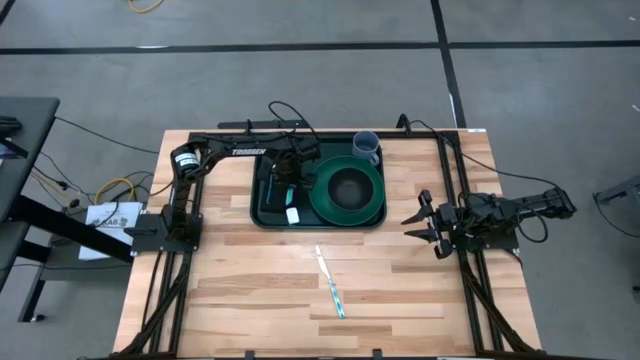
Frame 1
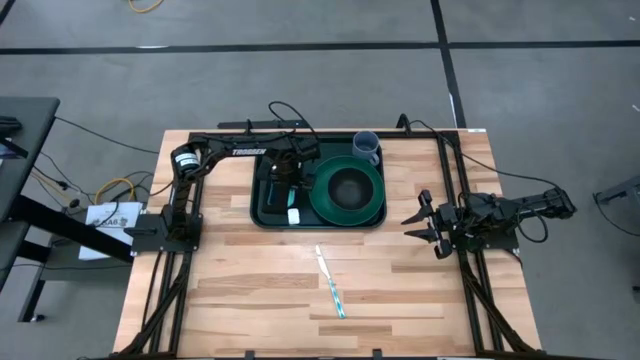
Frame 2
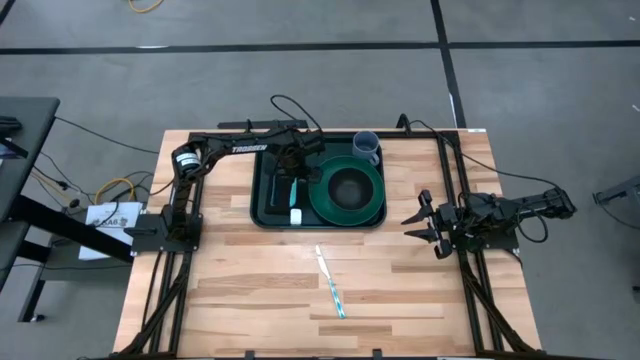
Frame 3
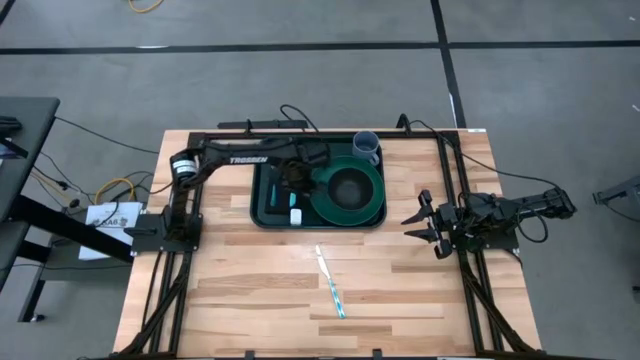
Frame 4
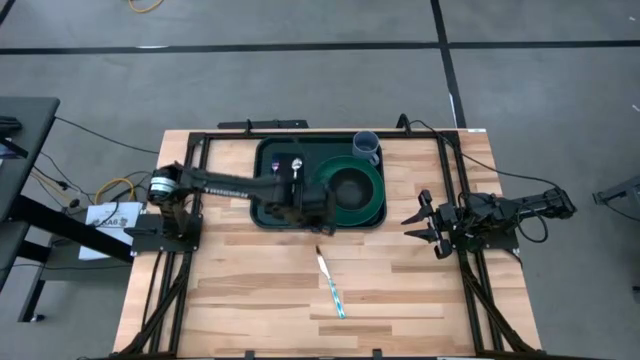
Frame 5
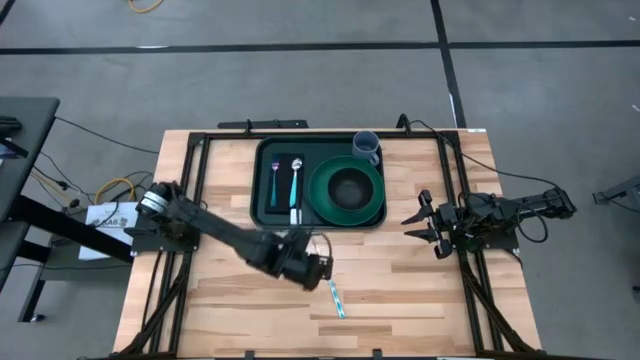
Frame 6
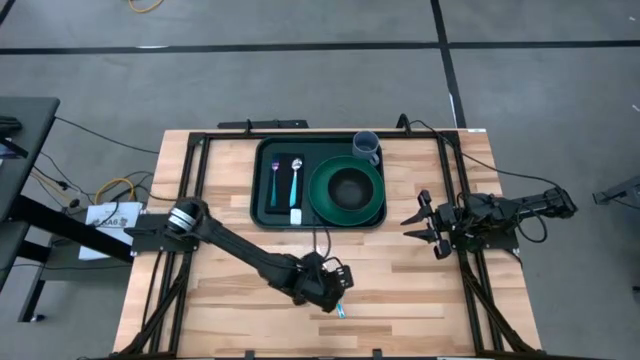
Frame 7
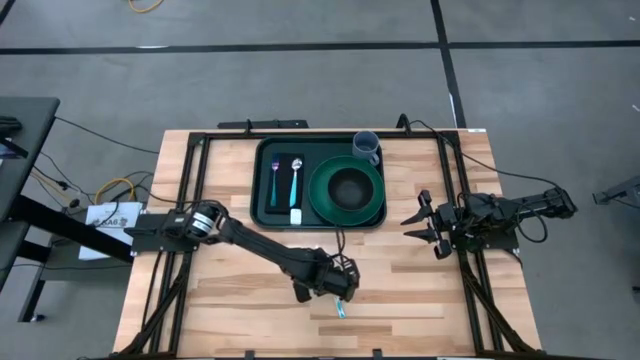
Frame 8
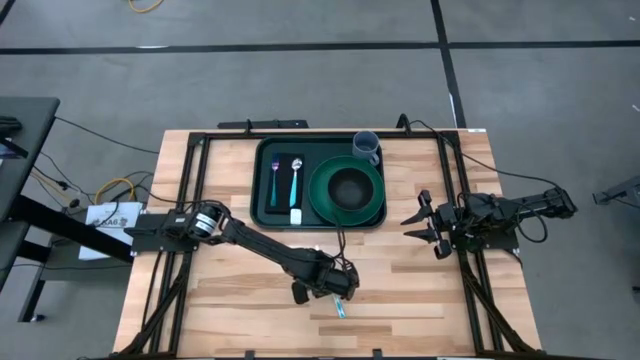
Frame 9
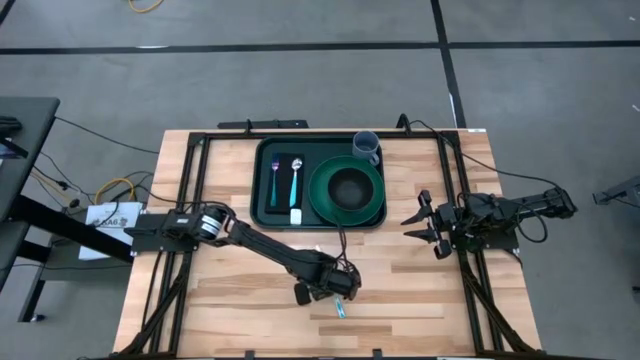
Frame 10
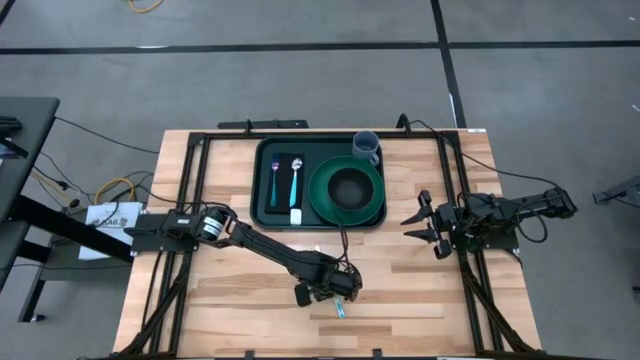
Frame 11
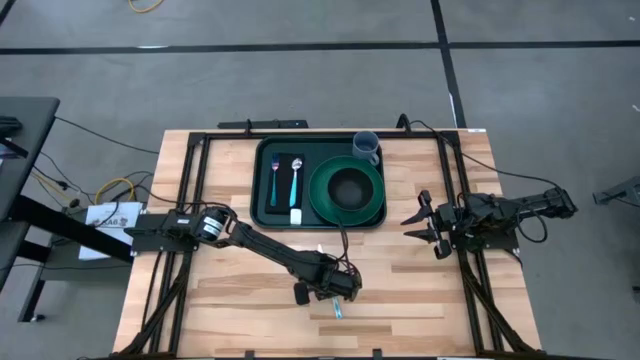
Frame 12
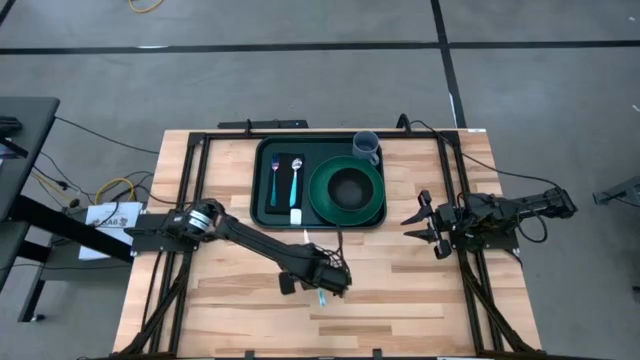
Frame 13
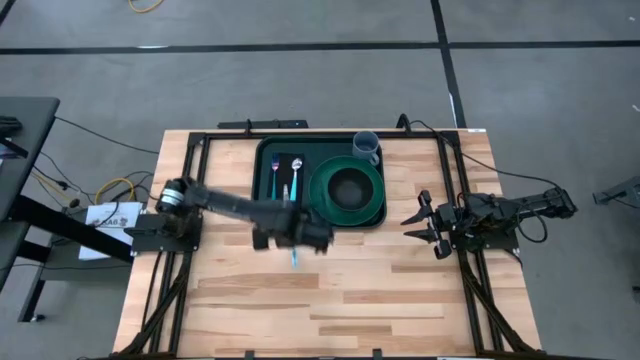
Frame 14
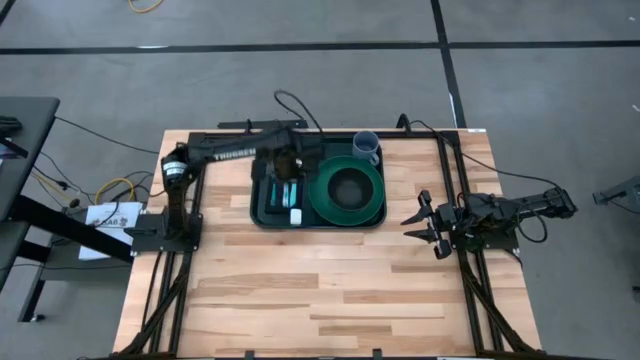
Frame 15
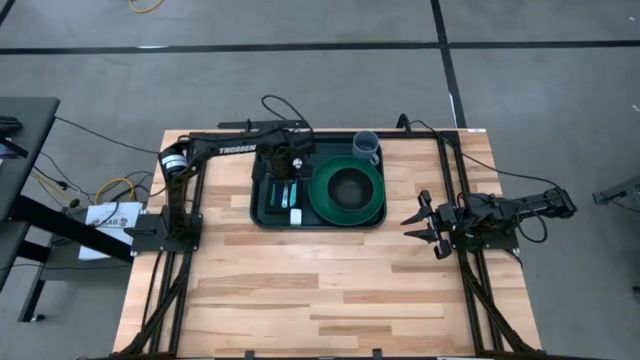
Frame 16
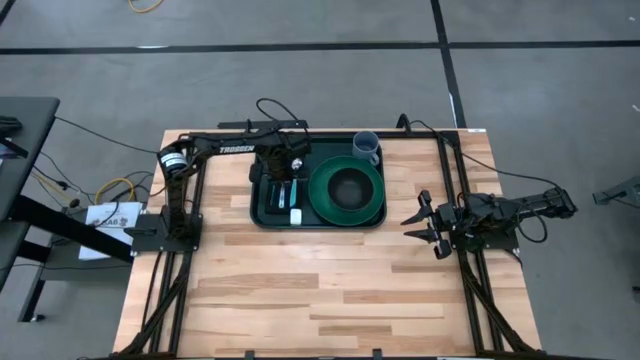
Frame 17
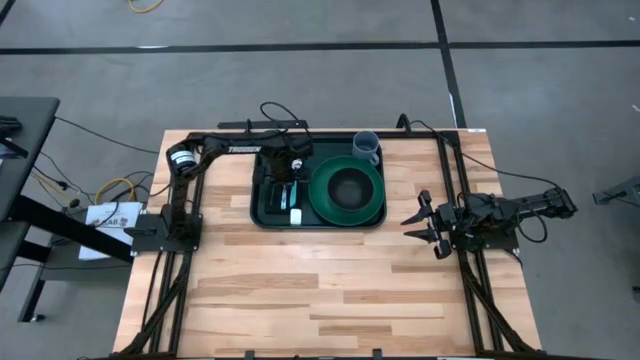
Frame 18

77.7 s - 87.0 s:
Task: Set up tray
Put the white patterned knife on the black napkin between the purple fork and blue spoon

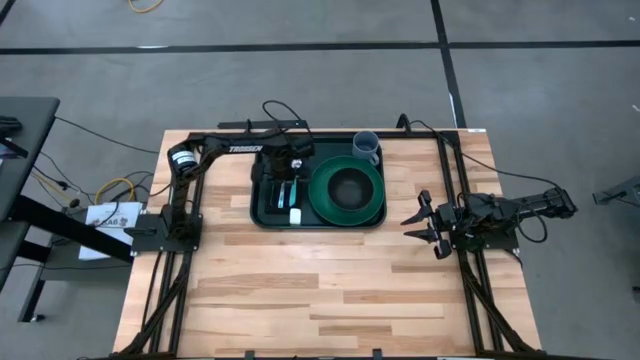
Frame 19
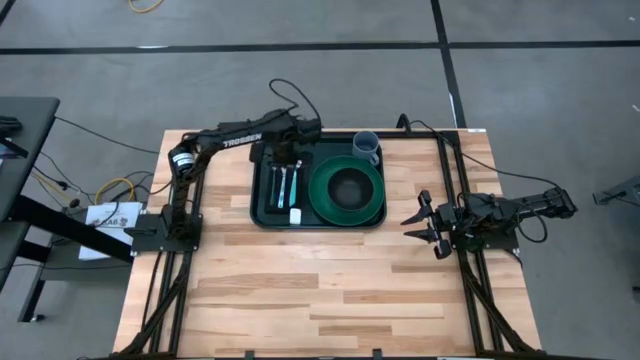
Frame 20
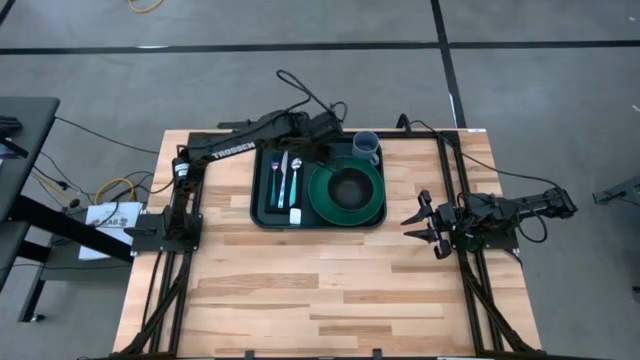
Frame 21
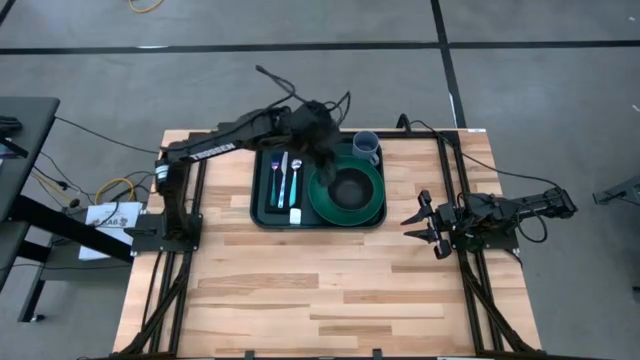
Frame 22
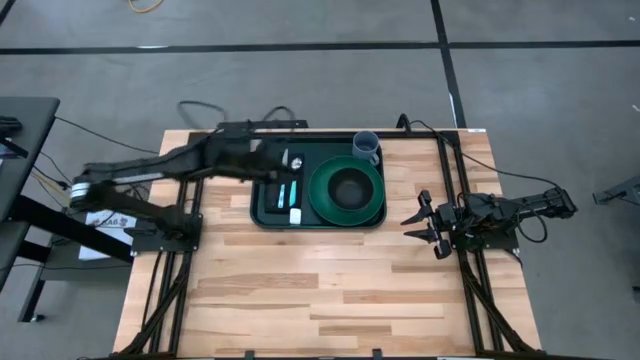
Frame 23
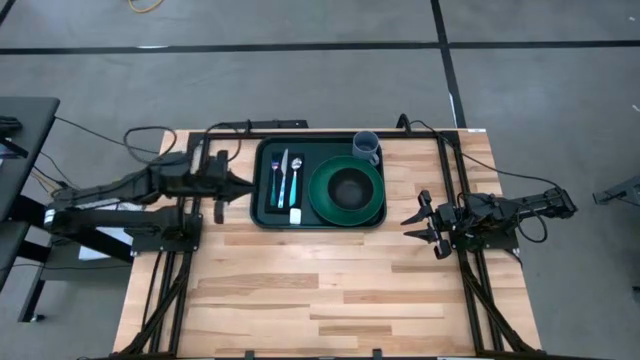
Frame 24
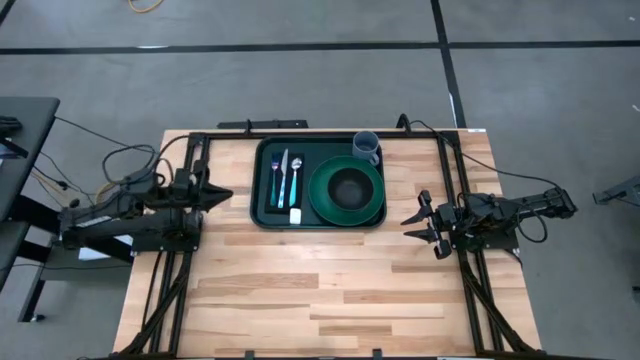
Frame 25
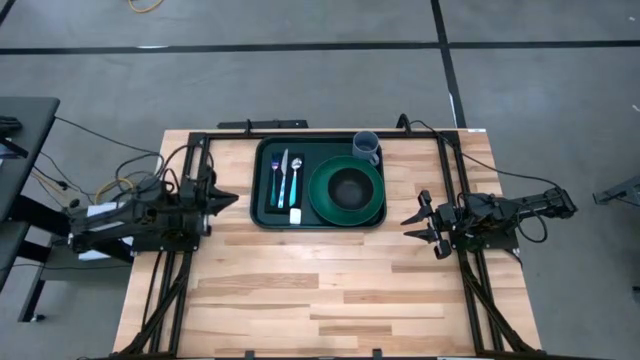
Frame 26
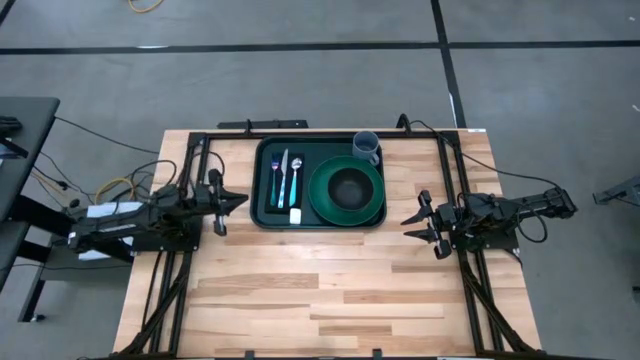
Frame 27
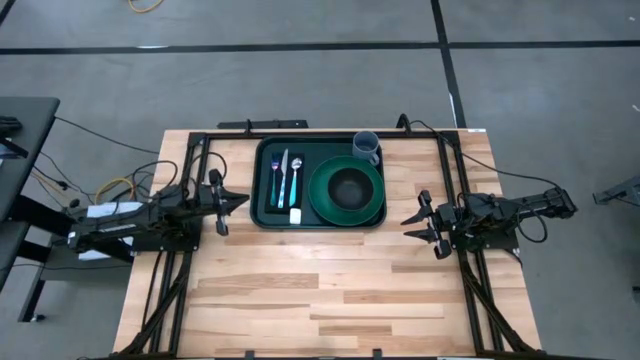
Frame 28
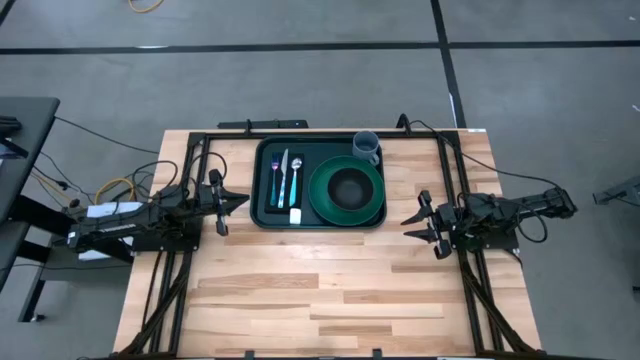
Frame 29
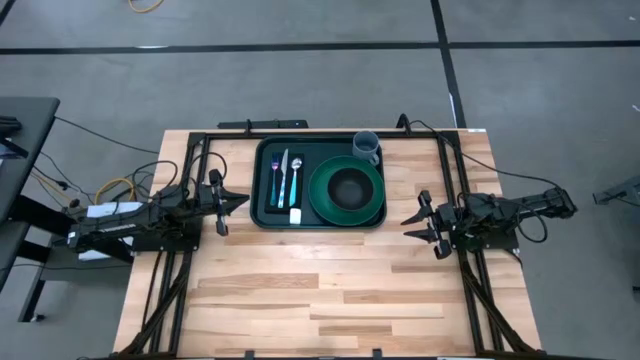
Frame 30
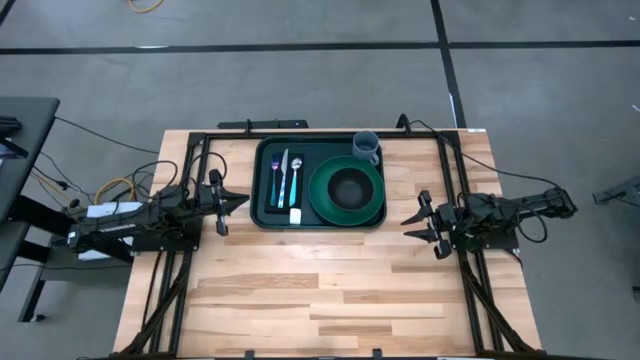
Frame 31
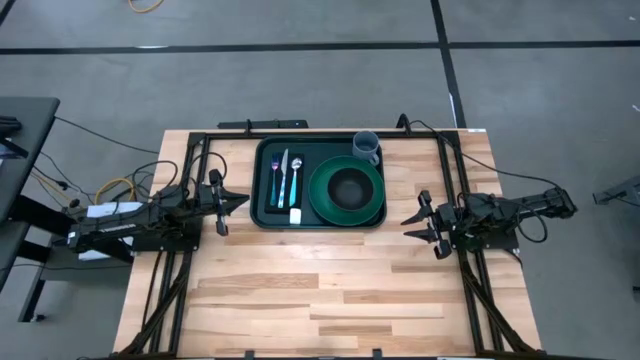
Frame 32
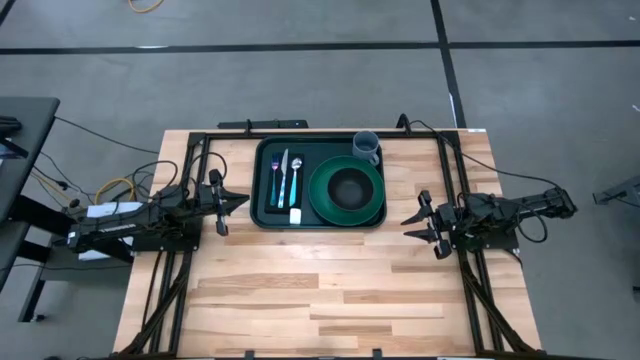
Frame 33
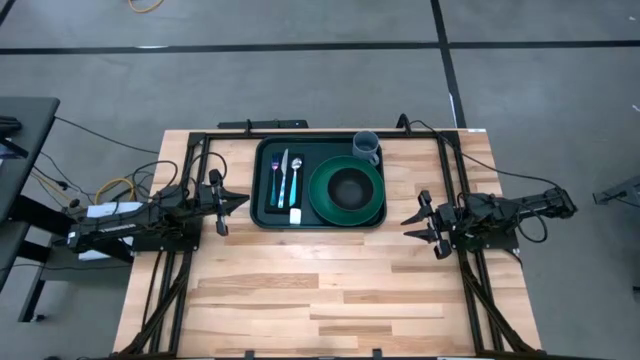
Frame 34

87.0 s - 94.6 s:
Return to Home Position

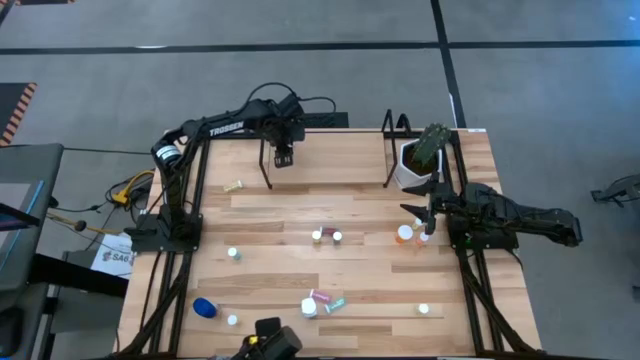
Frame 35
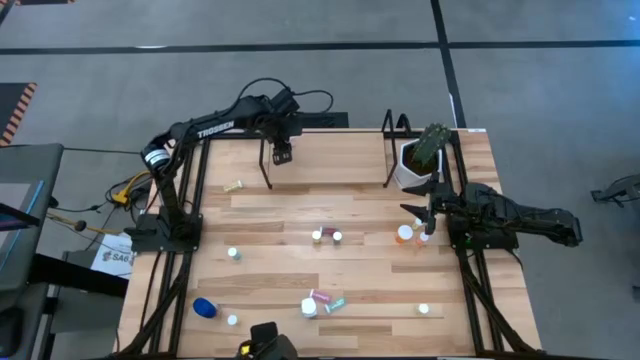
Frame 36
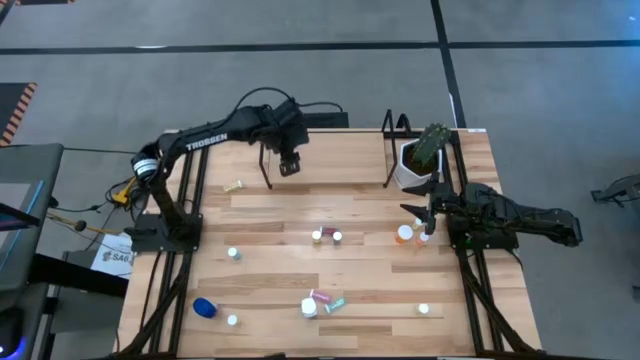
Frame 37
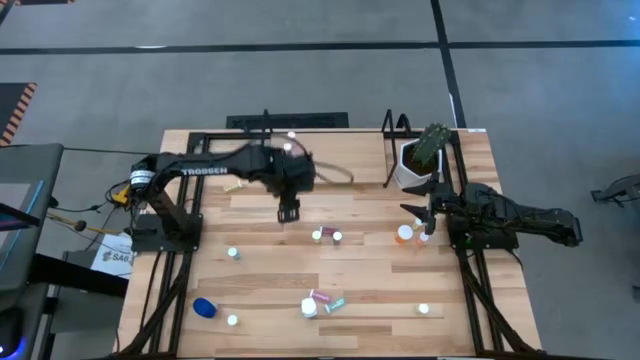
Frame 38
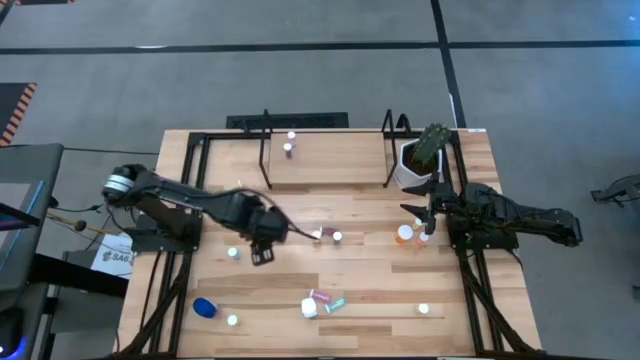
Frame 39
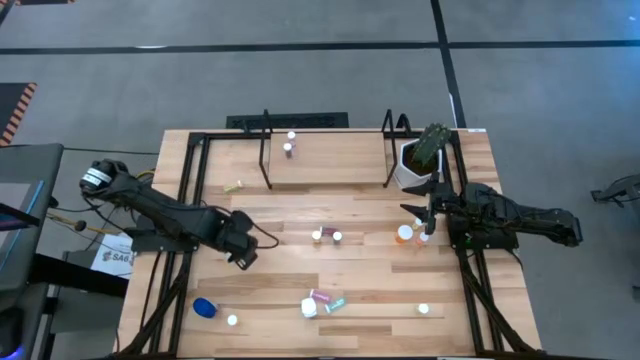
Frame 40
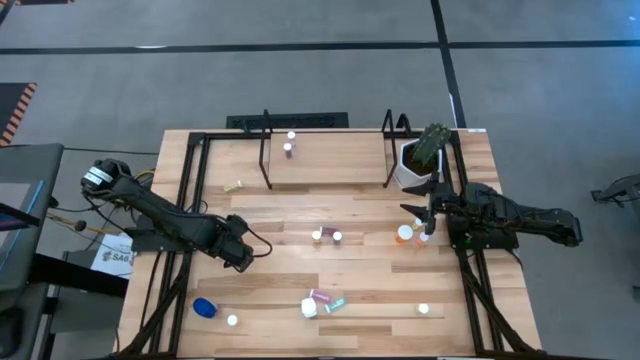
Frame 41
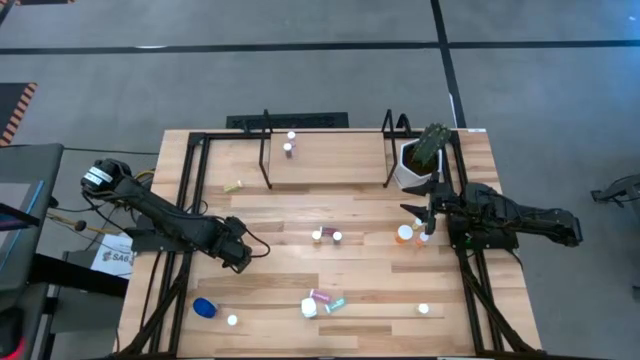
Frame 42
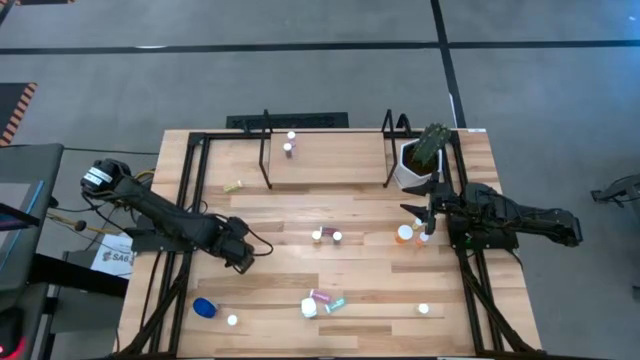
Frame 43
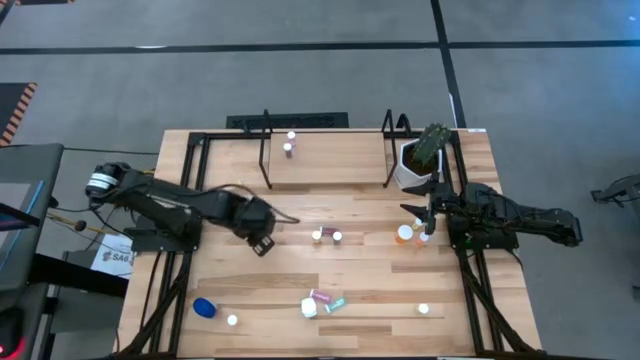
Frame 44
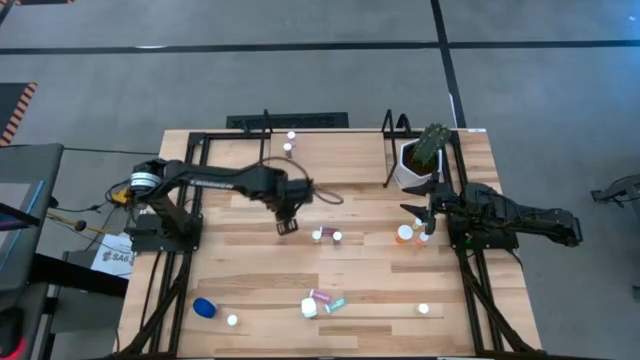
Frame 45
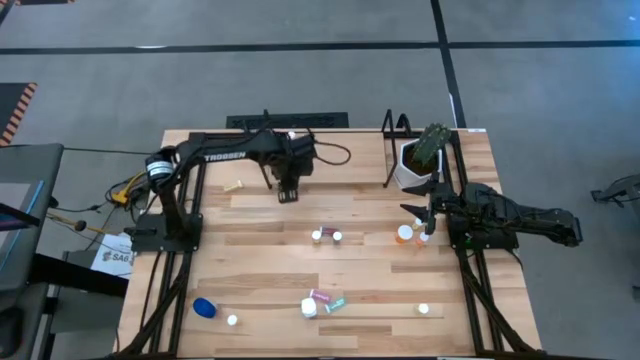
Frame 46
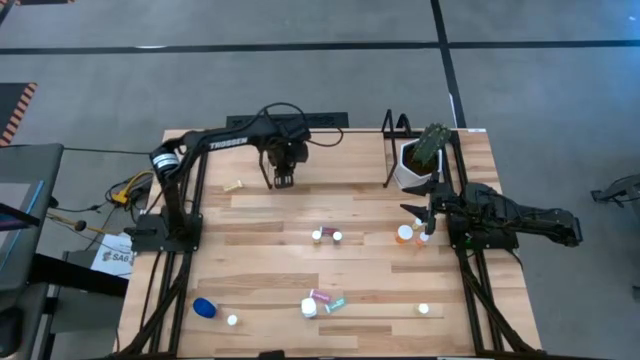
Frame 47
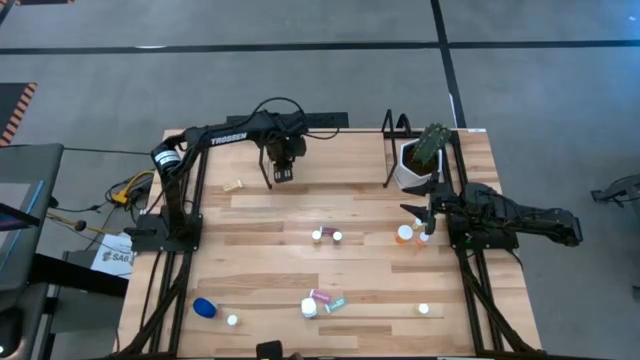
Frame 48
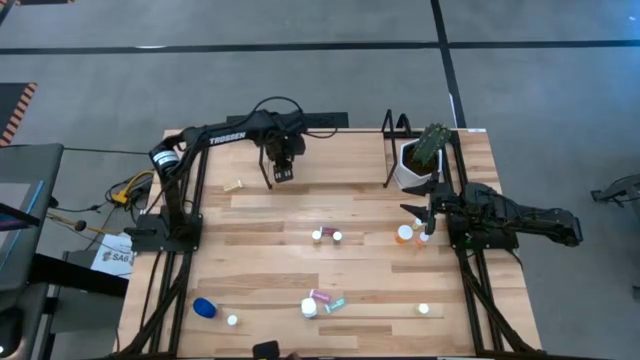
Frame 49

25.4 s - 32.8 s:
Task: Pick and place medicine bottles onto shelf by color
Put the blue pill bottle on the shelf
